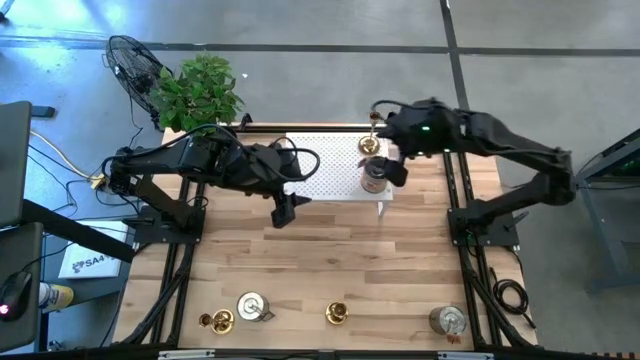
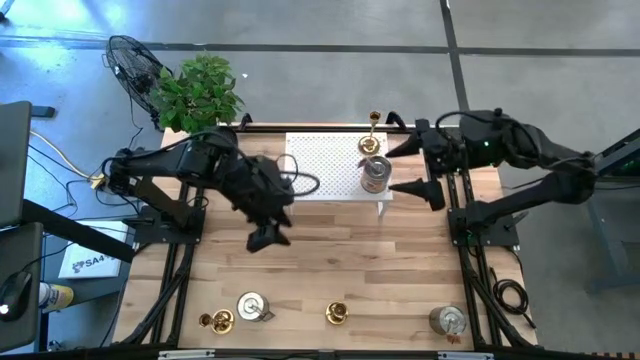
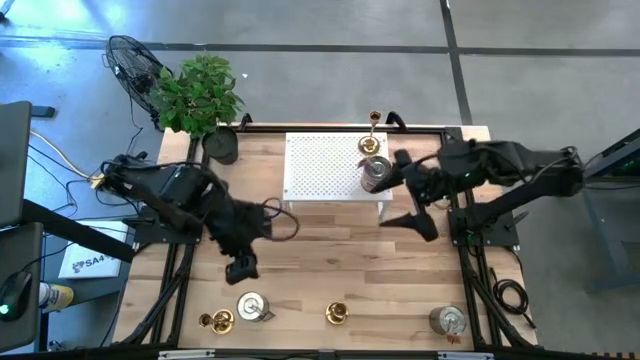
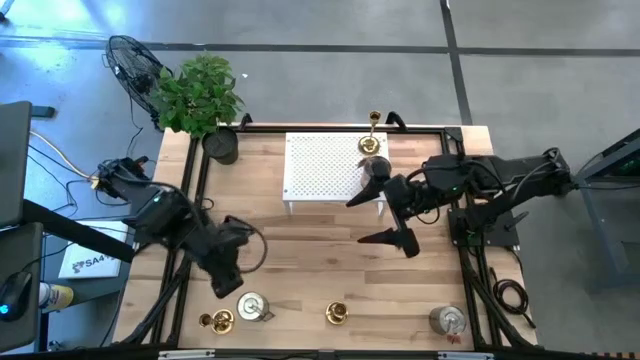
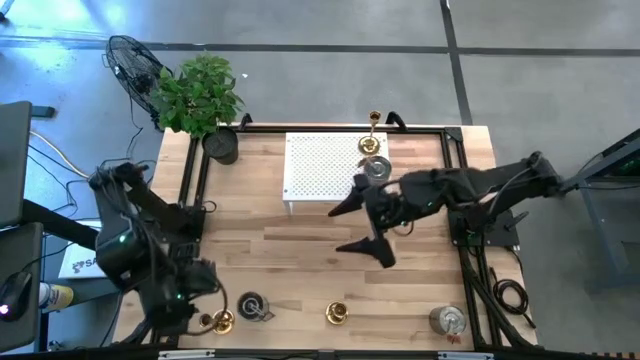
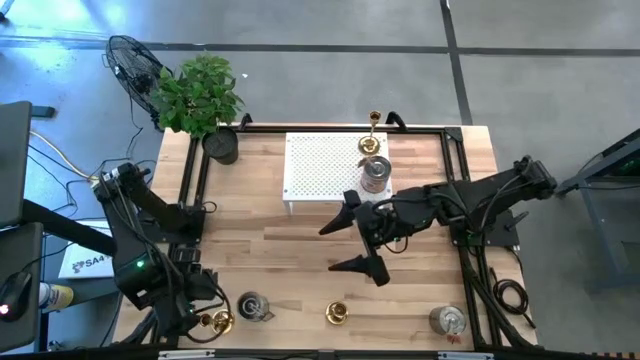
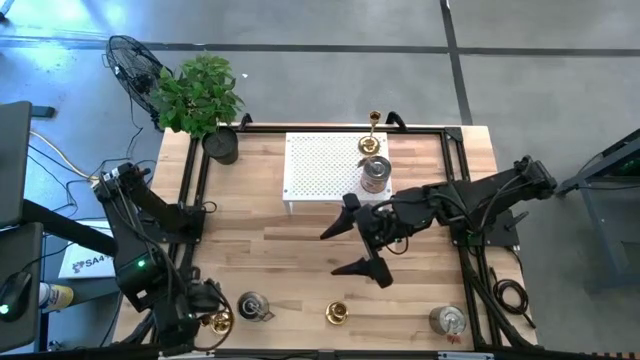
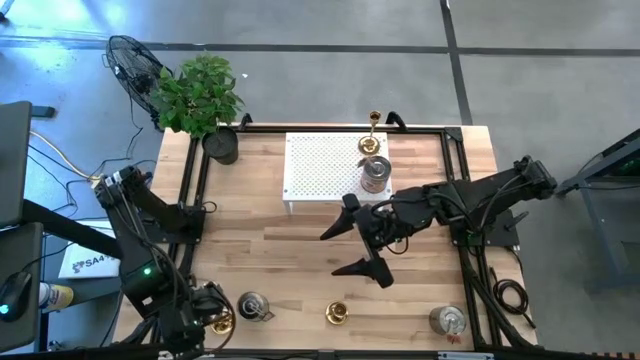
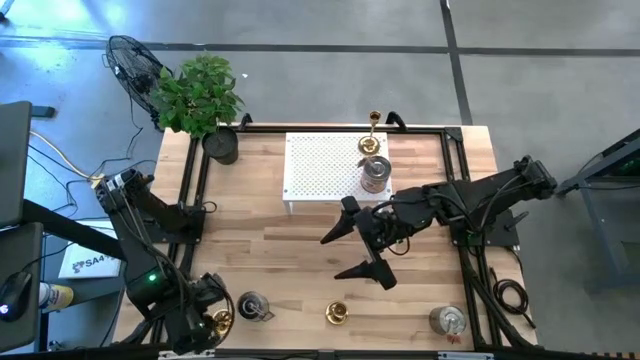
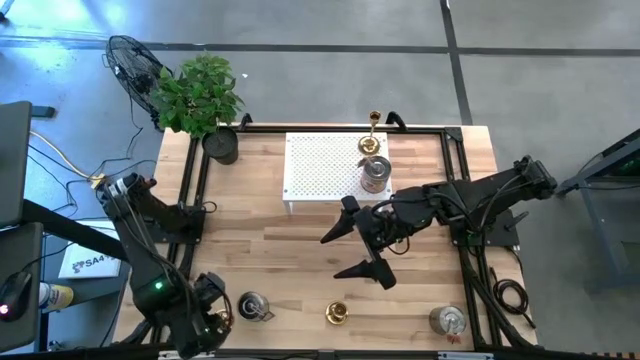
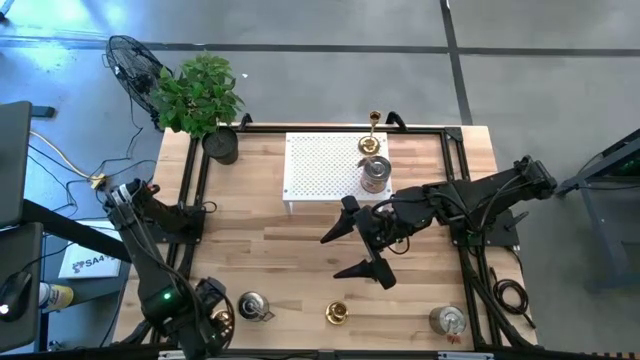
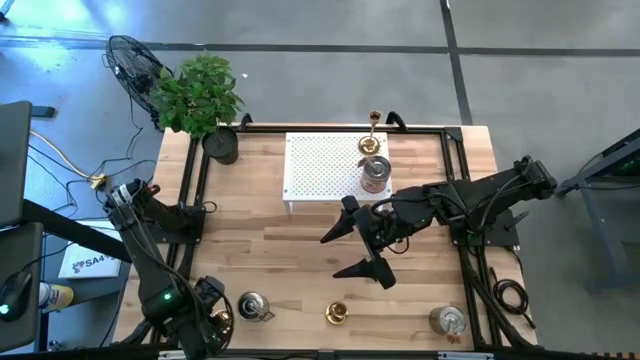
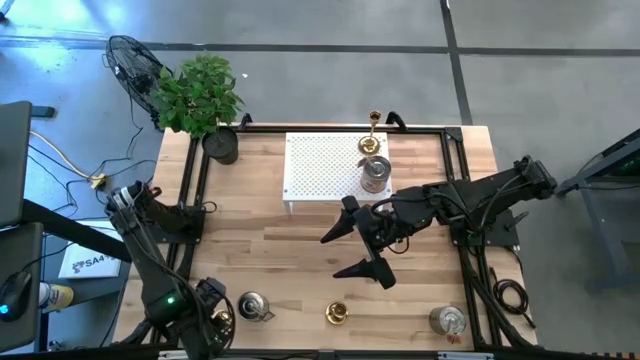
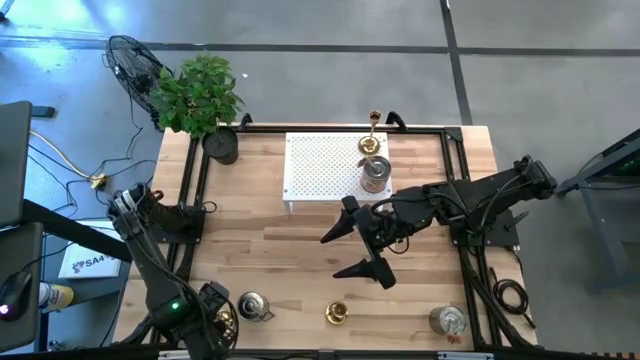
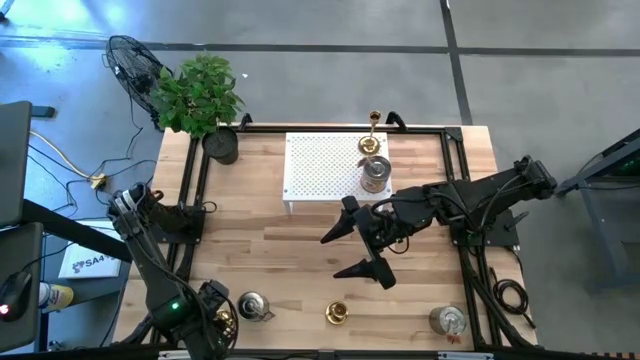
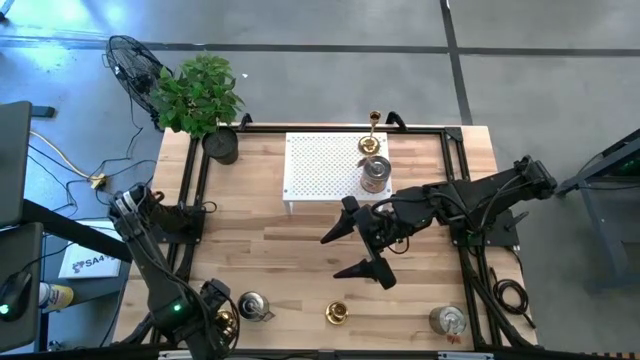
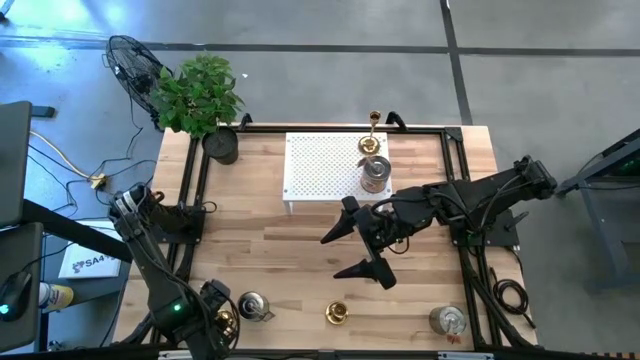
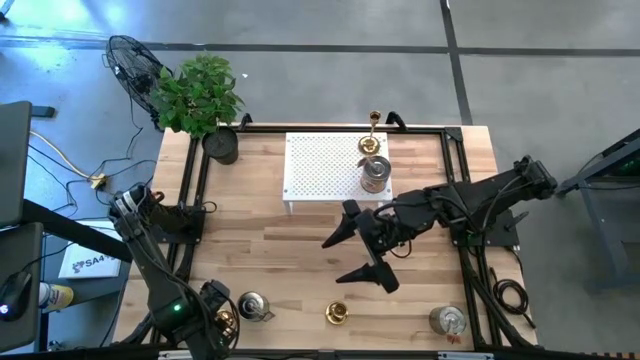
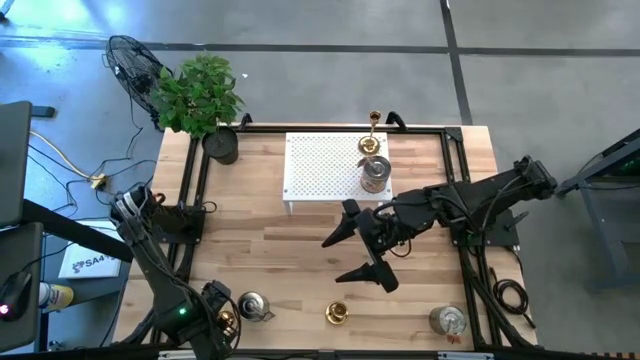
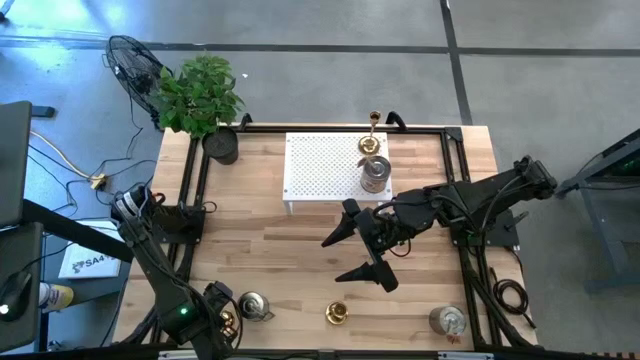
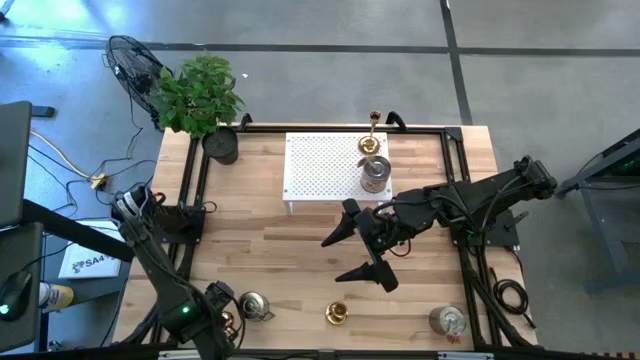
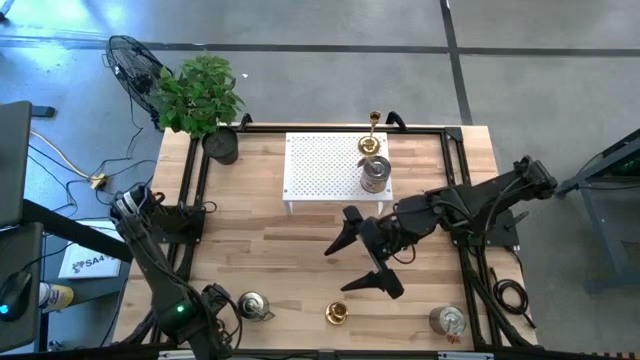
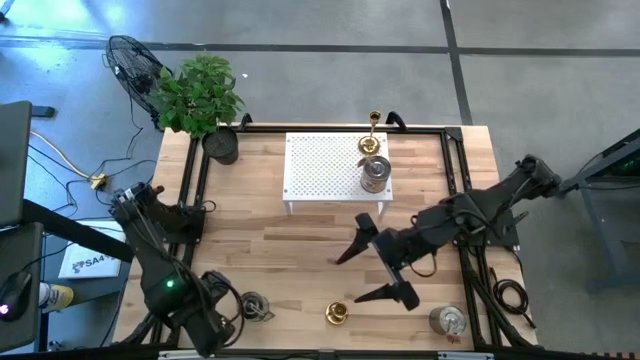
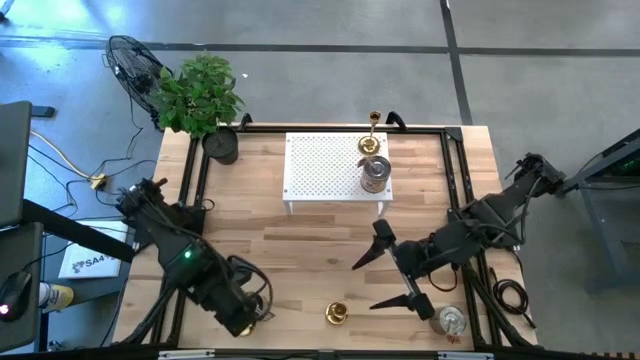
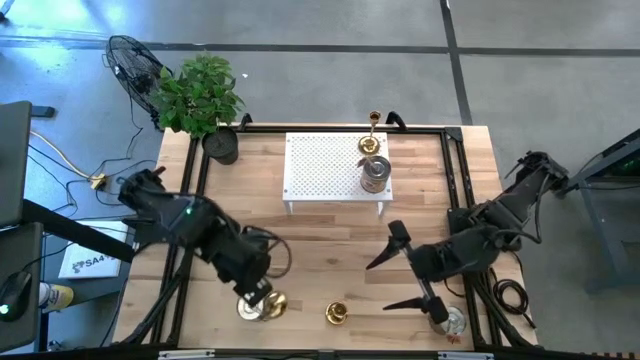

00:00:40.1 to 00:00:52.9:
Task: Pick & Place candle stick holders
Put the left gold candle holder on the shelf

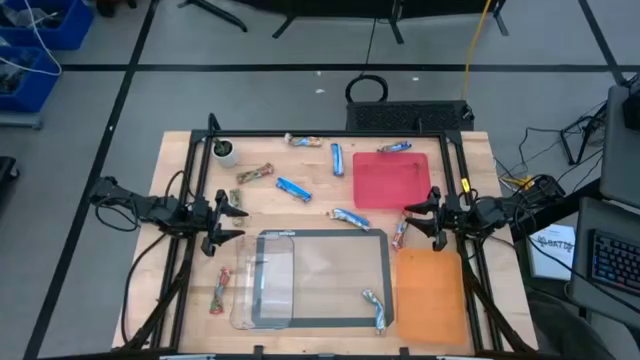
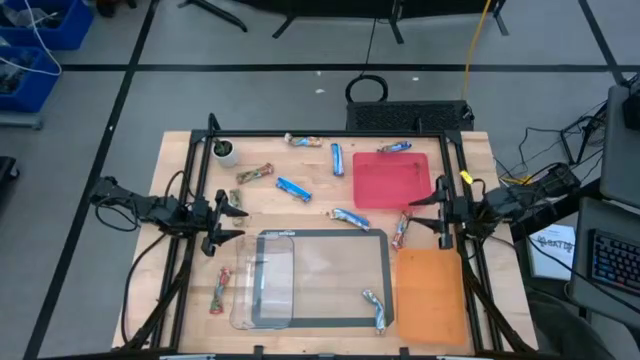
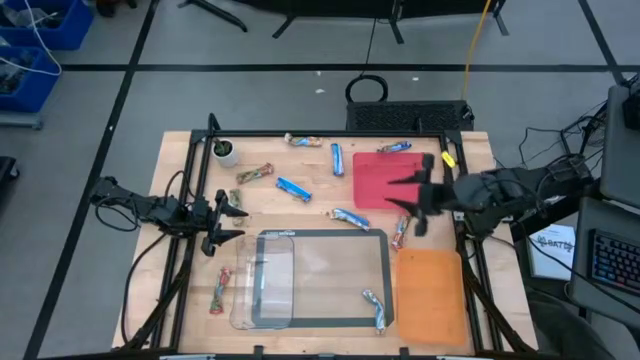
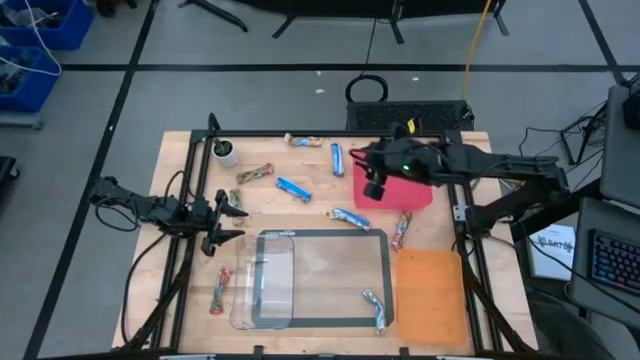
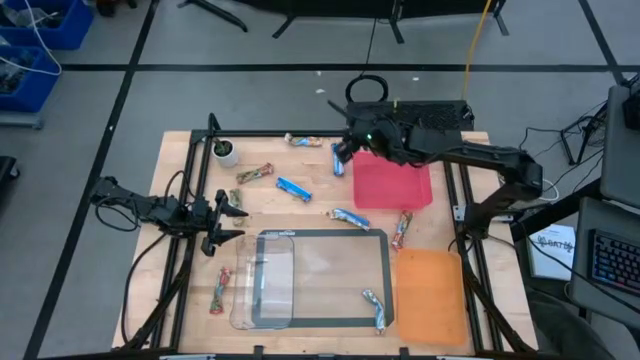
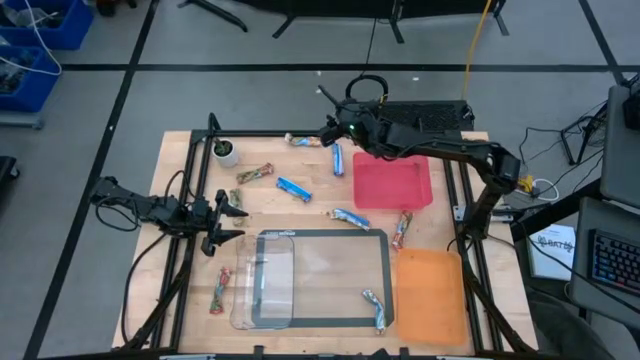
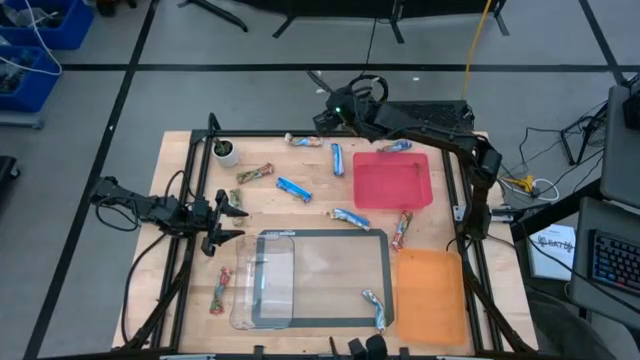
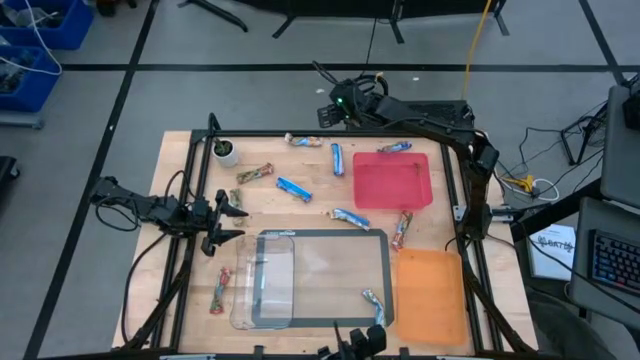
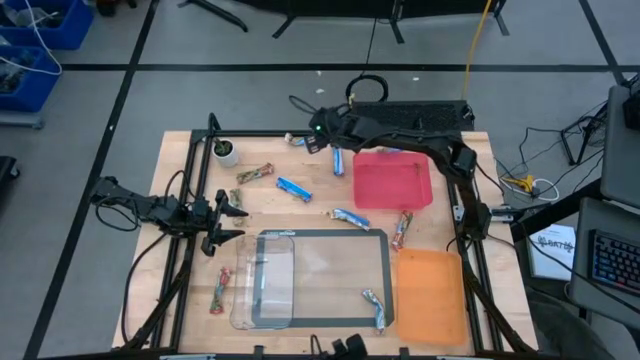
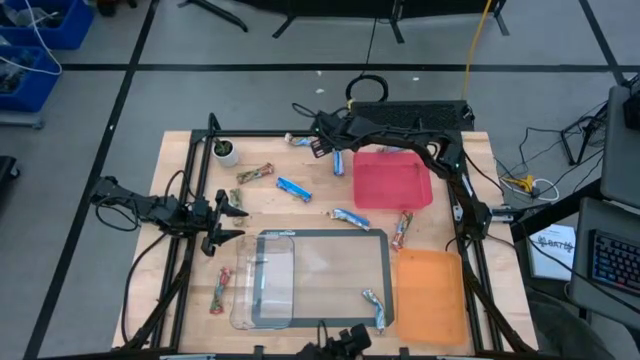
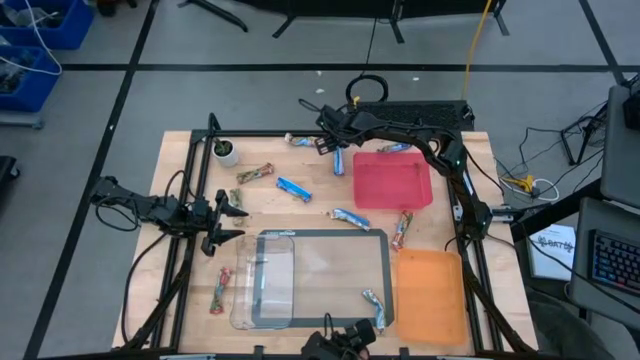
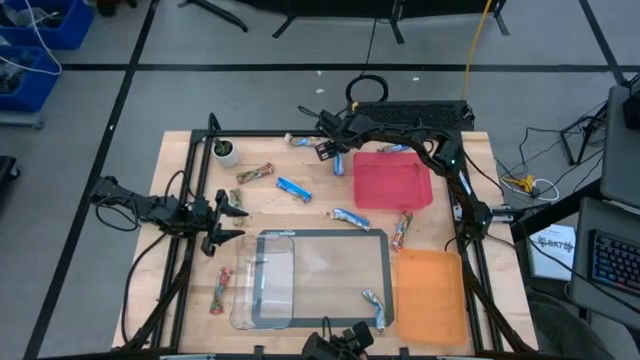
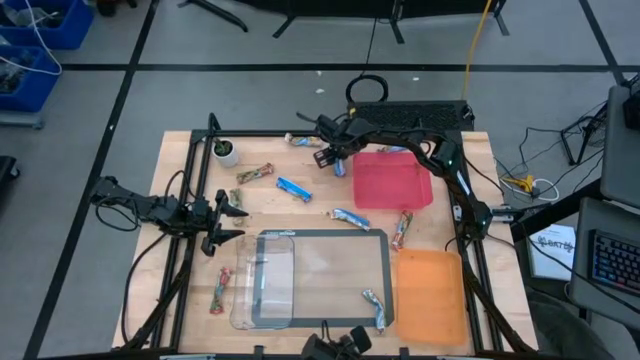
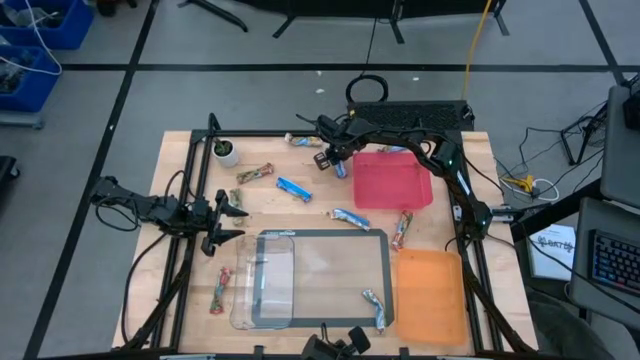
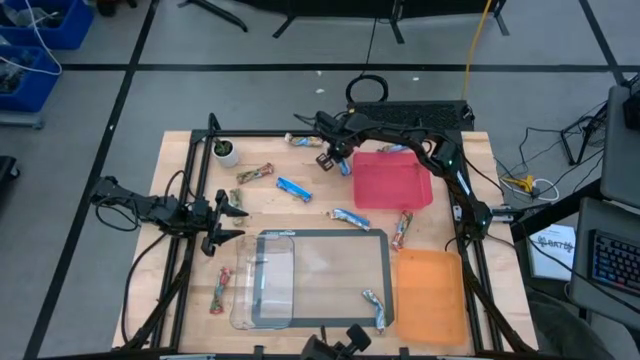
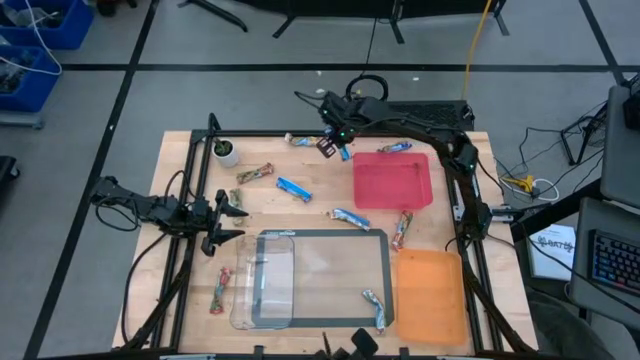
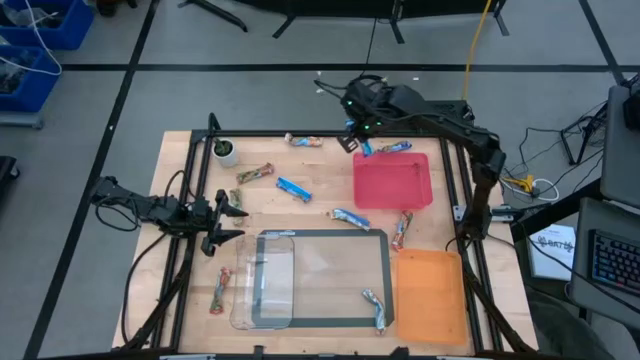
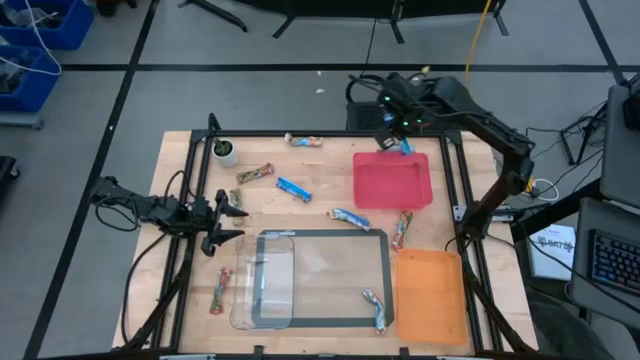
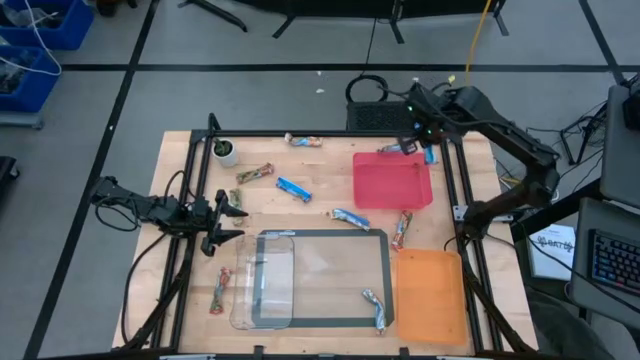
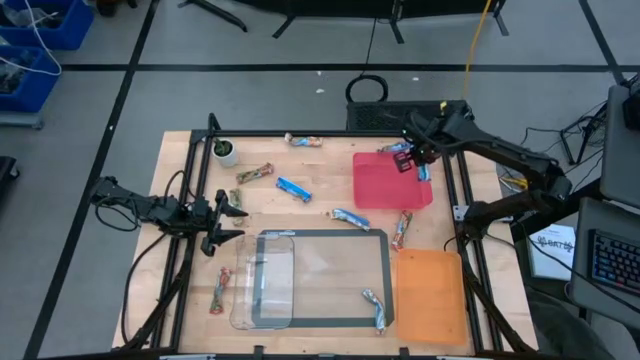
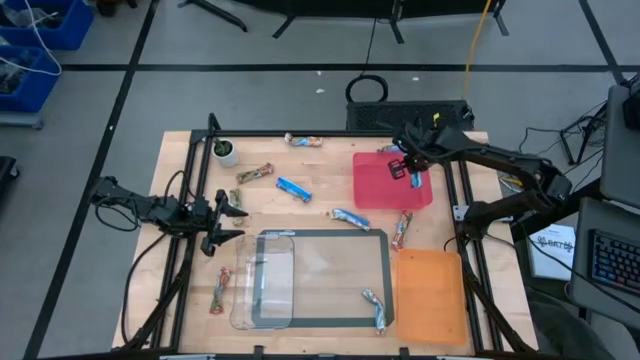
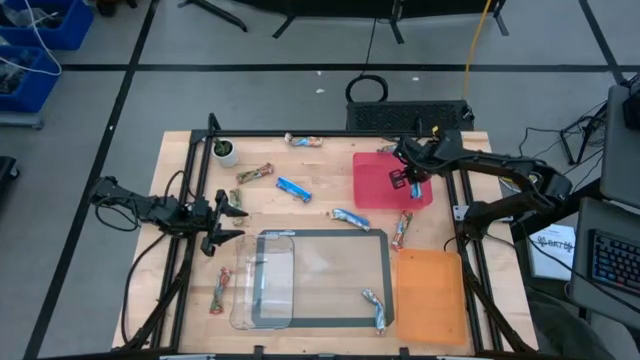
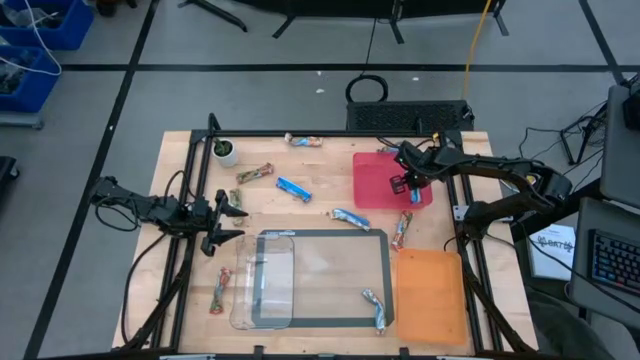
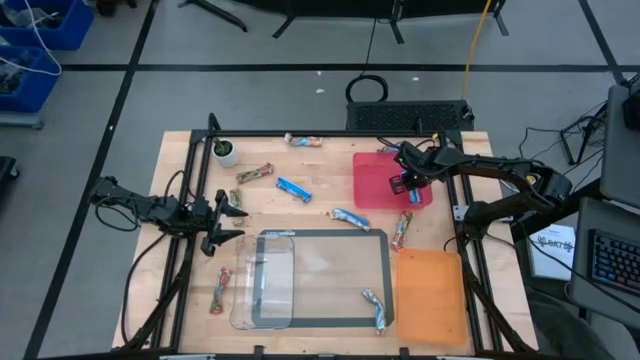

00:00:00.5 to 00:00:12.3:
Task: Pick and place Granola Bars by type
Put the top left blue granola bar into the red bin
